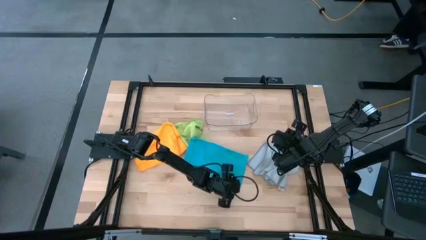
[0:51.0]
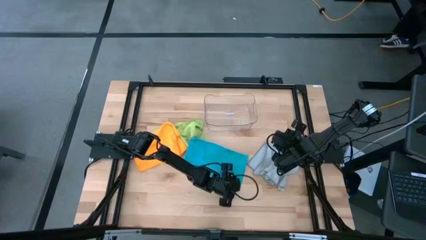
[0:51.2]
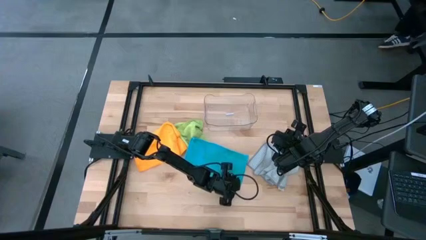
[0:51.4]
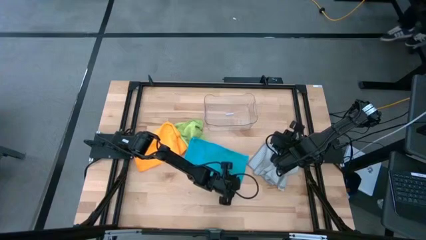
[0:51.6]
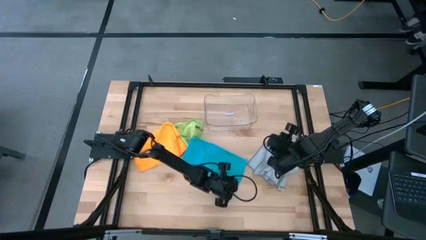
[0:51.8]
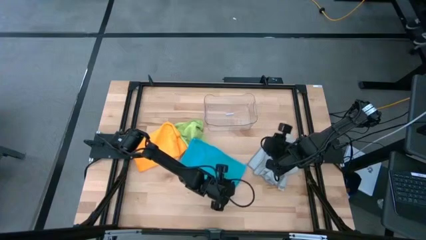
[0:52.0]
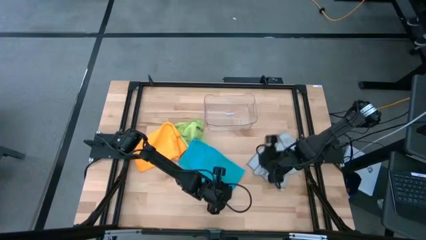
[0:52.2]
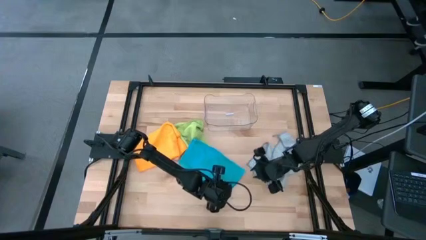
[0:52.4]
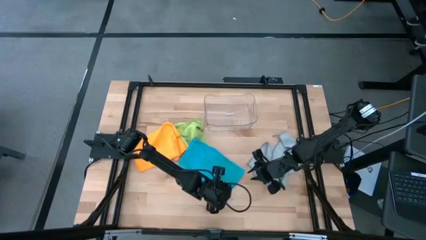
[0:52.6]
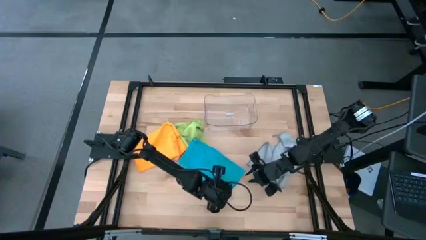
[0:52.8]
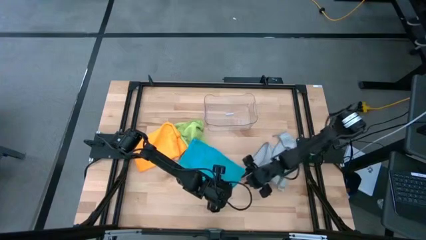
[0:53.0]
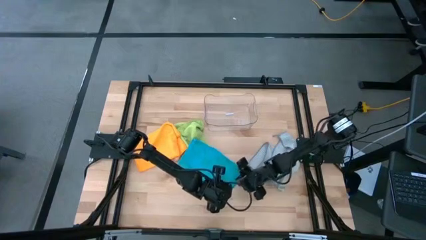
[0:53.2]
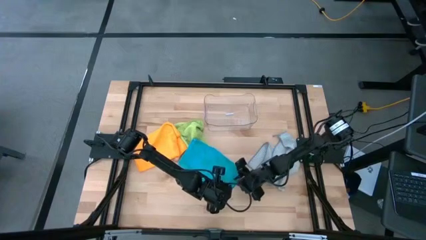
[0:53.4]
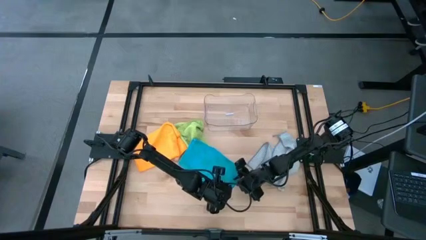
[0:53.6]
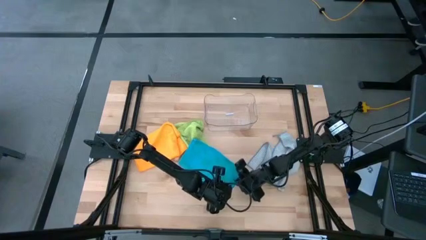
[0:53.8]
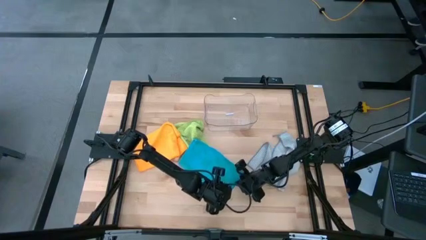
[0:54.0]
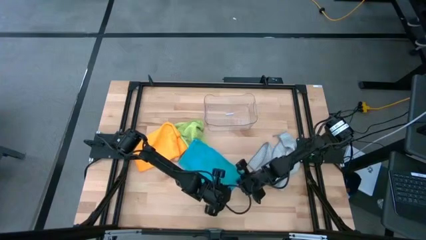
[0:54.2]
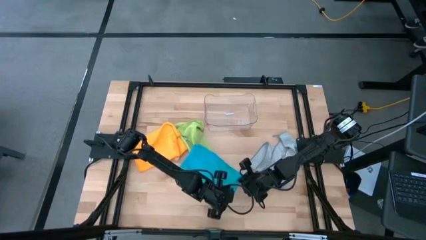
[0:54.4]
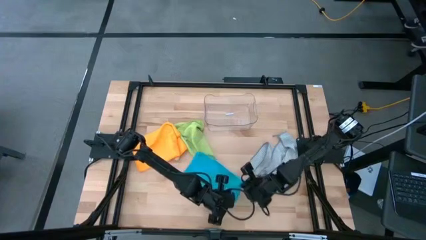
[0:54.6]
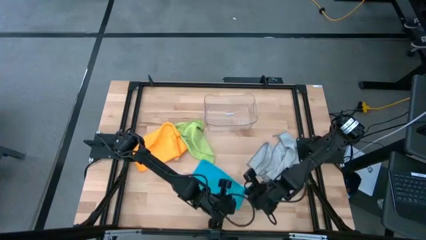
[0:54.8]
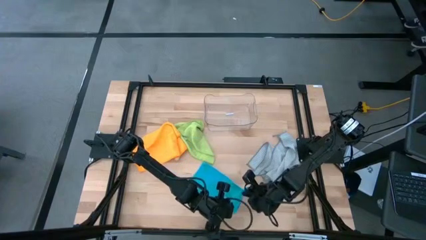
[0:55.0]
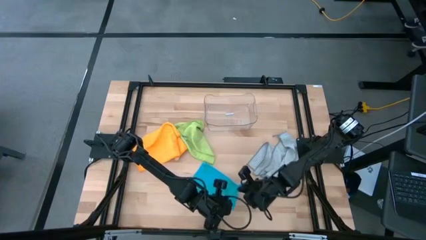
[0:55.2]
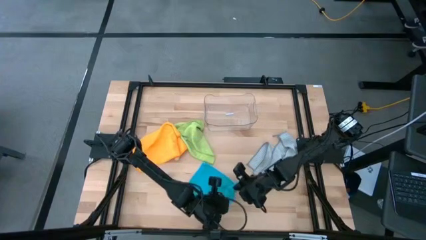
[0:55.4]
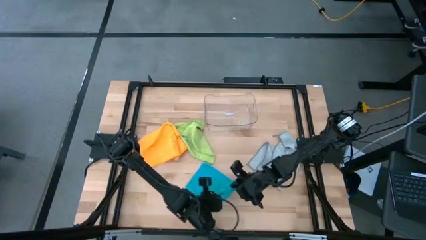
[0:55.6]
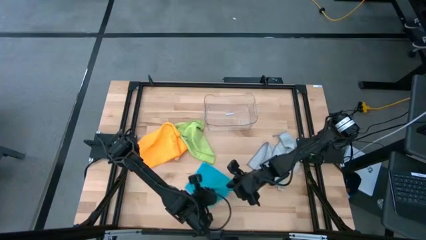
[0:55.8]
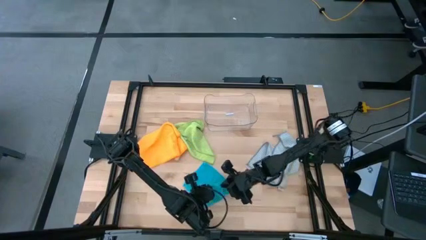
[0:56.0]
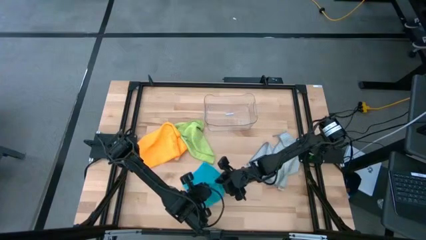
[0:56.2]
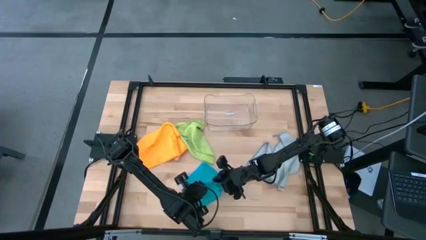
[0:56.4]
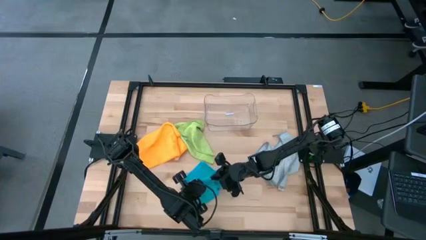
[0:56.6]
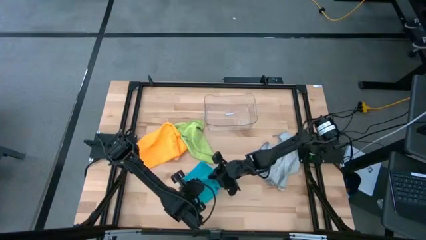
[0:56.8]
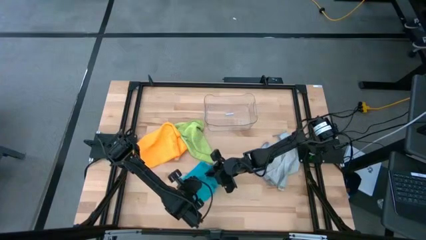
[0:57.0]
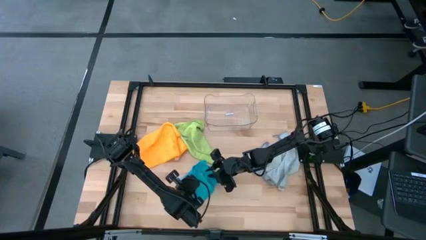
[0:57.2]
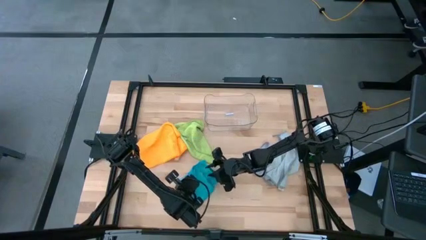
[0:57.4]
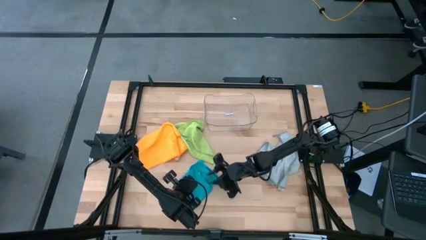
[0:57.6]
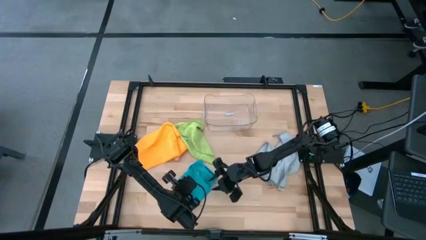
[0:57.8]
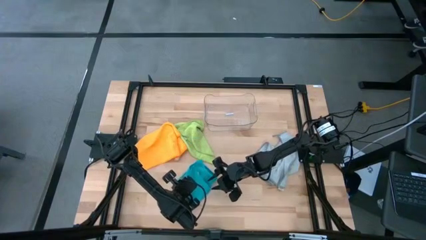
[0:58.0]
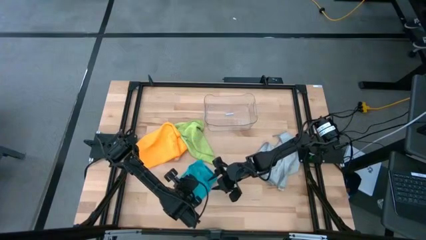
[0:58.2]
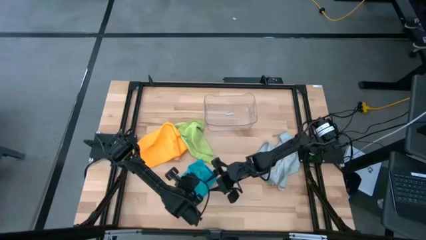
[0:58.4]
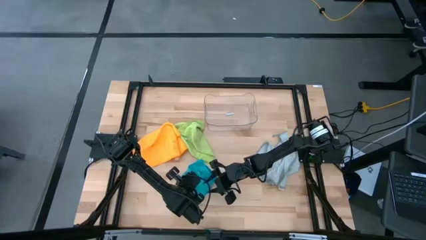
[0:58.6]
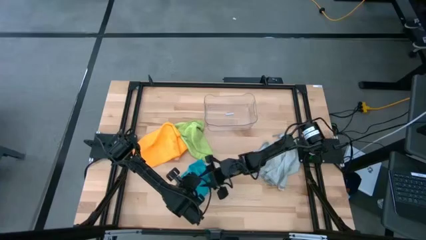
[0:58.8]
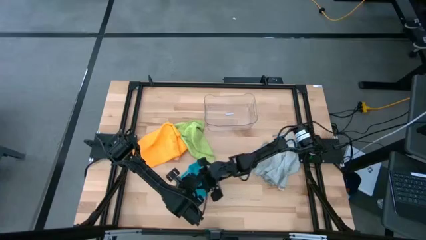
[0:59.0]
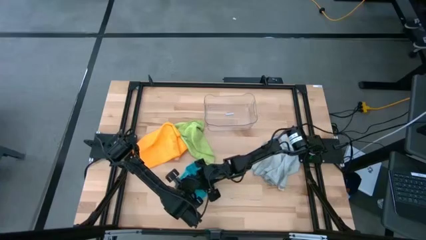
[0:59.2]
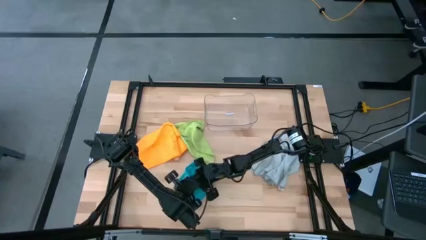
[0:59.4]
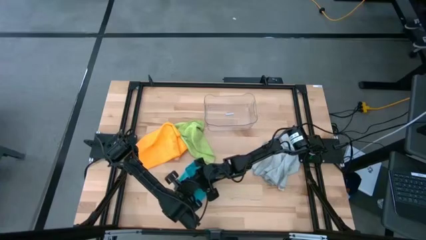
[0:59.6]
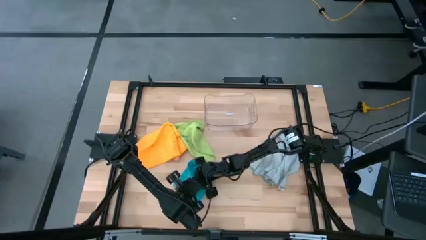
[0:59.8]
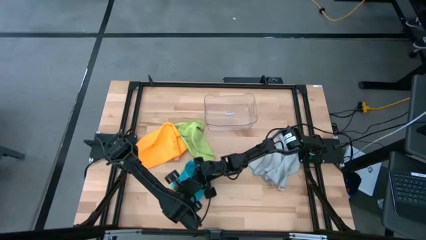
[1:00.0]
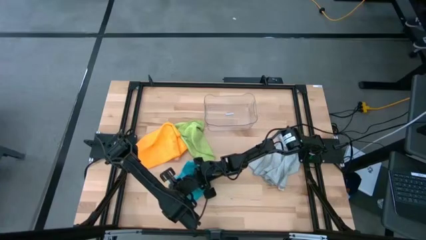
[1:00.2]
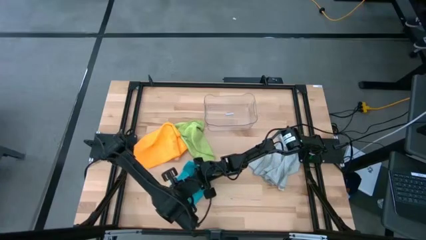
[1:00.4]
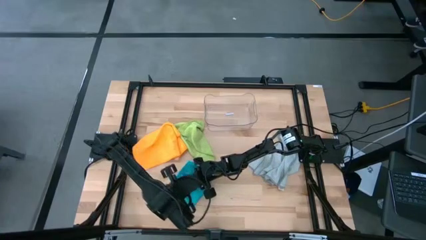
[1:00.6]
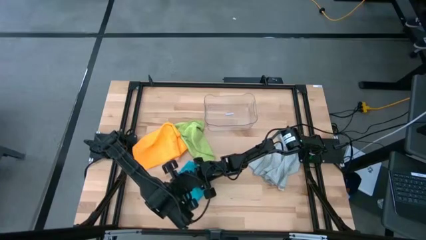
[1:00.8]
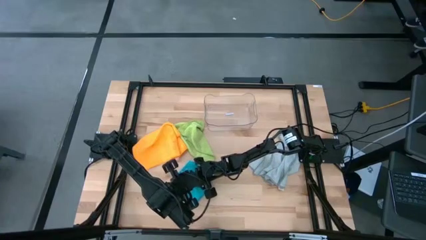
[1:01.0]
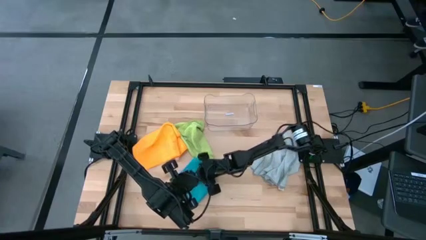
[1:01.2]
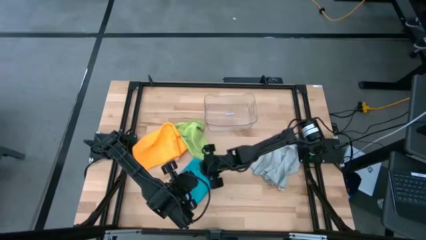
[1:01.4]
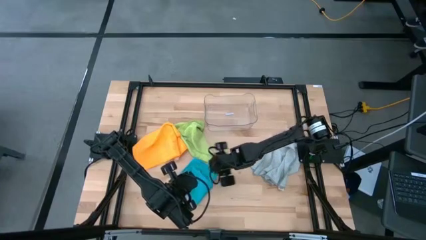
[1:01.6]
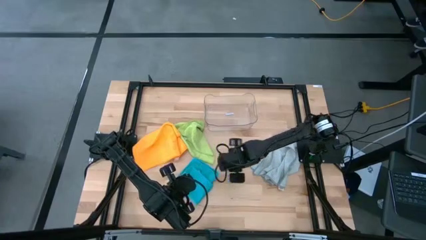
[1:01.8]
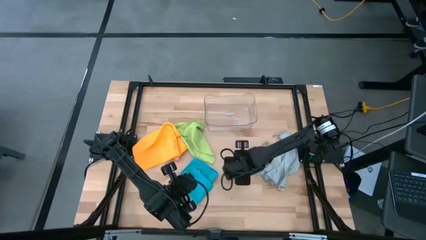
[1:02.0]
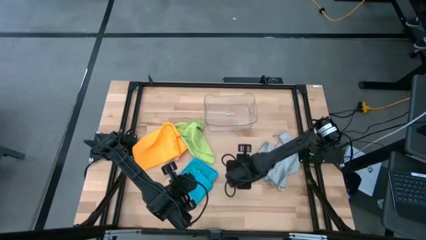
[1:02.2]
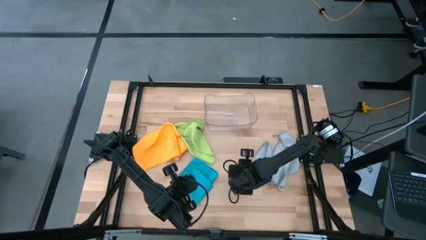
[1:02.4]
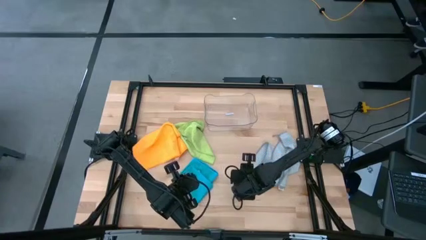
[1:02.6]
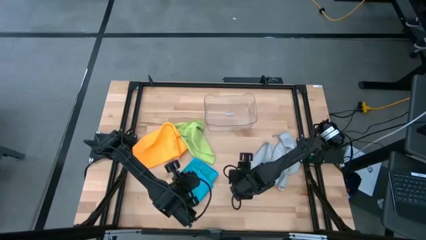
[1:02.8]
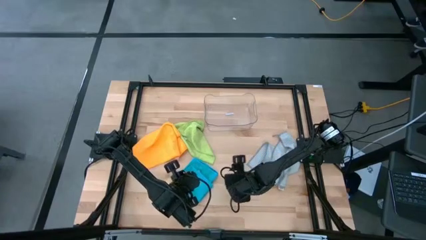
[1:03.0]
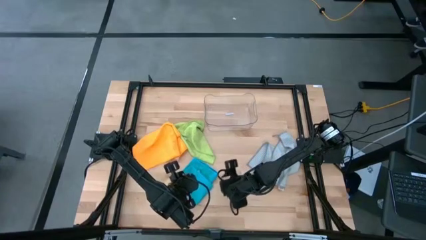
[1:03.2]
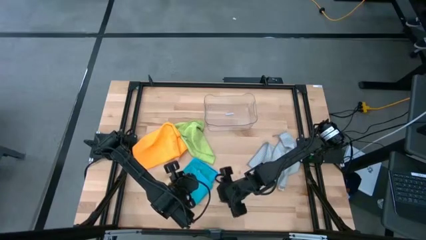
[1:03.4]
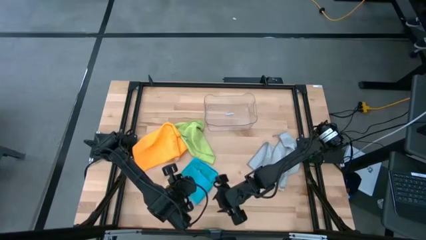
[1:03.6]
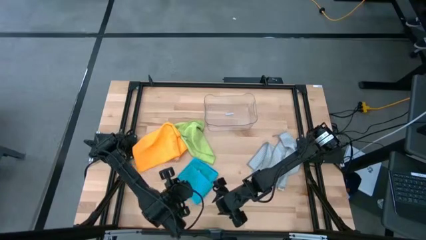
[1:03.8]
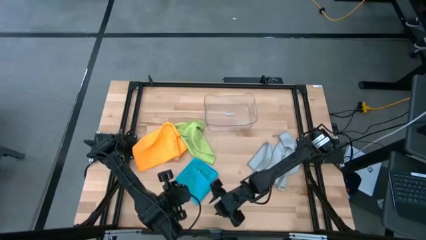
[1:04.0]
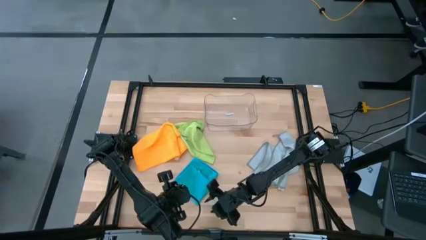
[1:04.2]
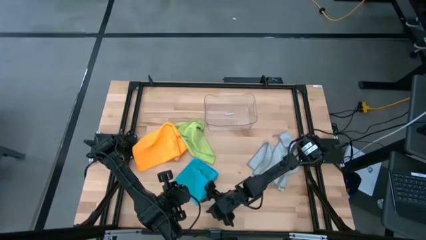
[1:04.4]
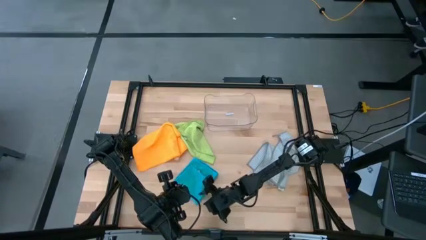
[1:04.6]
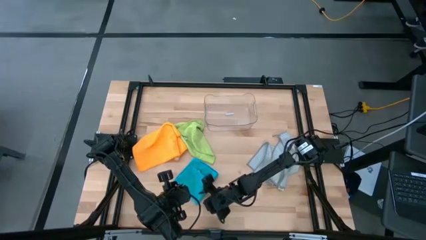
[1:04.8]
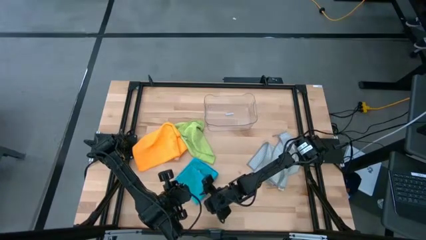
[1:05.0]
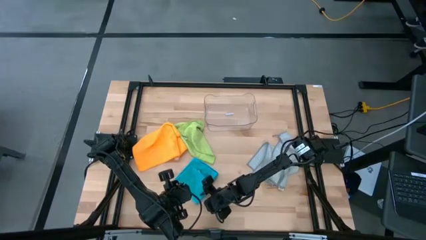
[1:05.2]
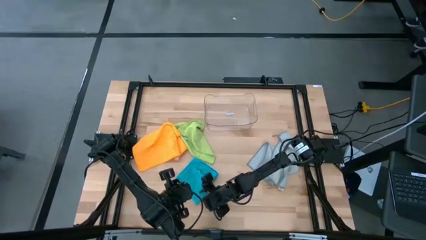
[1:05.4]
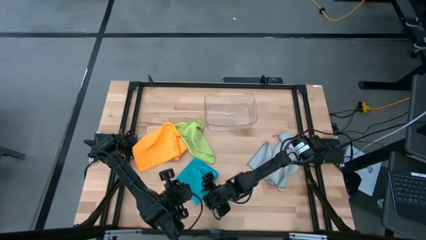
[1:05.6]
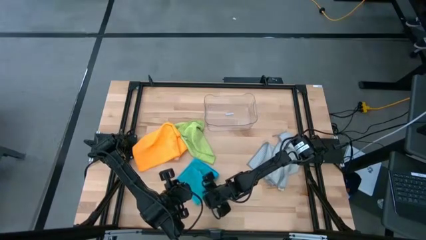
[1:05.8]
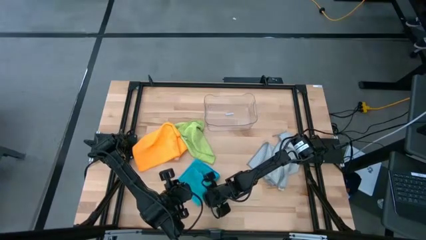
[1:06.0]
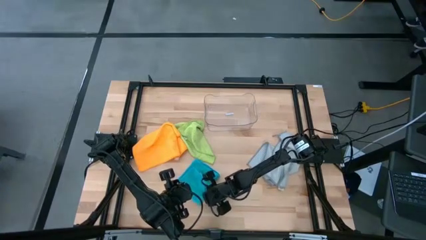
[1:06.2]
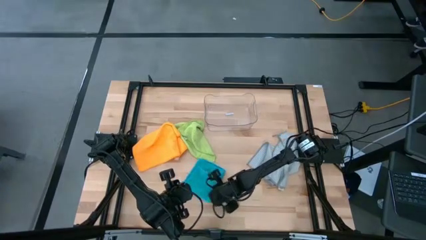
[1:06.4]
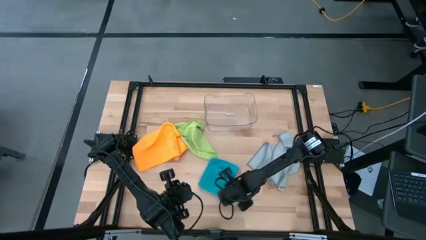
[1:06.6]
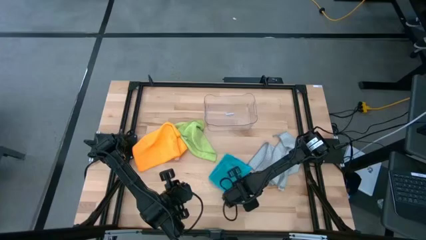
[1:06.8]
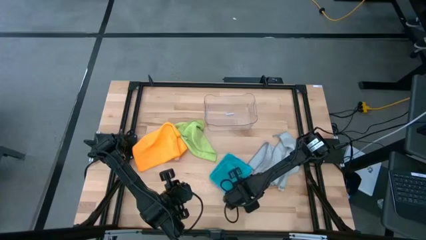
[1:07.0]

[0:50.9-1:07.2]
Task: Fold microfiber towels
Fold the blue towel
